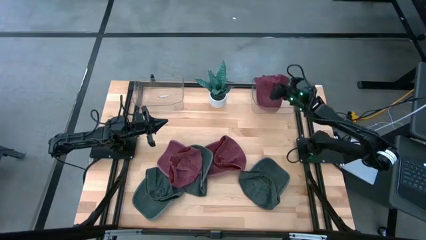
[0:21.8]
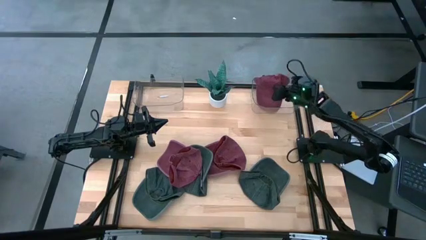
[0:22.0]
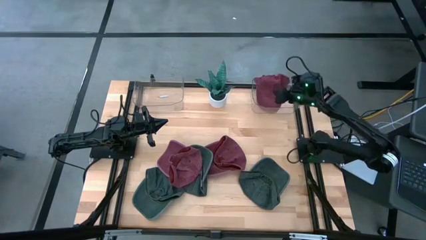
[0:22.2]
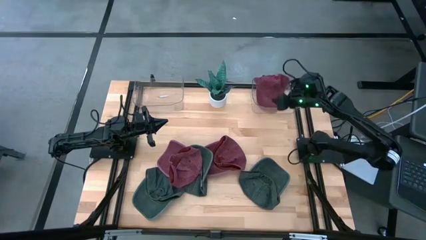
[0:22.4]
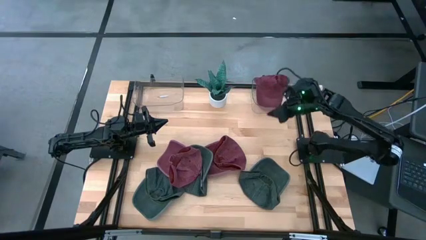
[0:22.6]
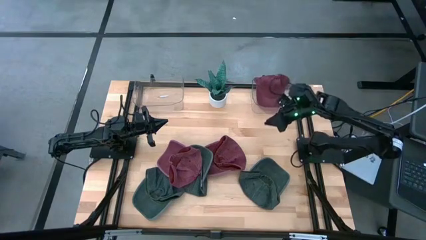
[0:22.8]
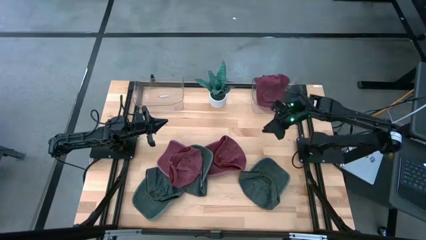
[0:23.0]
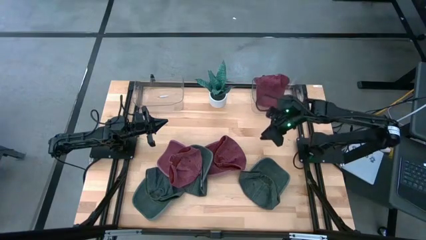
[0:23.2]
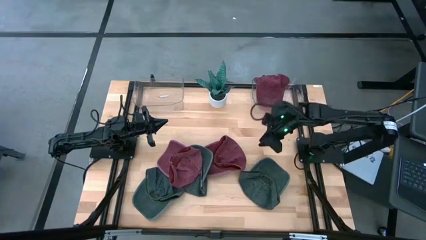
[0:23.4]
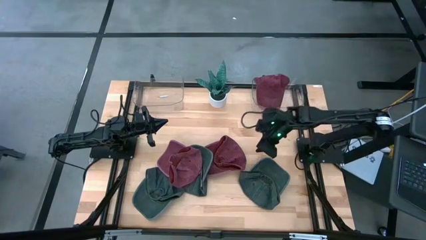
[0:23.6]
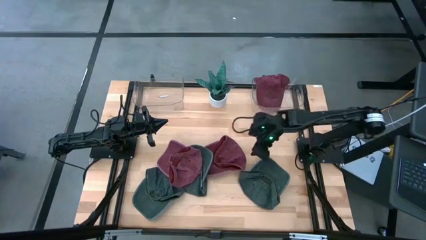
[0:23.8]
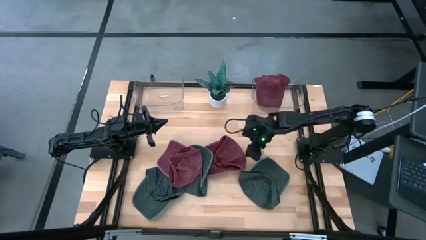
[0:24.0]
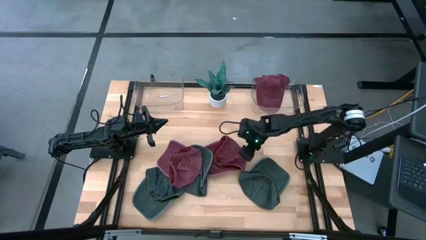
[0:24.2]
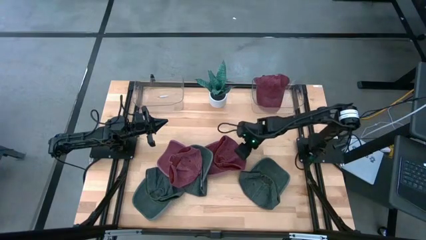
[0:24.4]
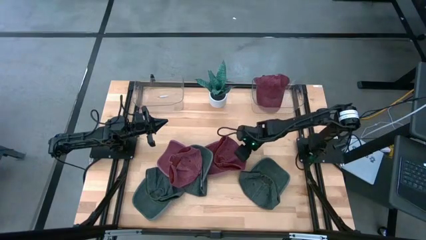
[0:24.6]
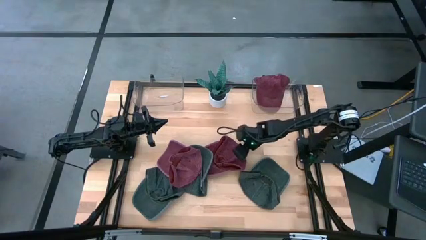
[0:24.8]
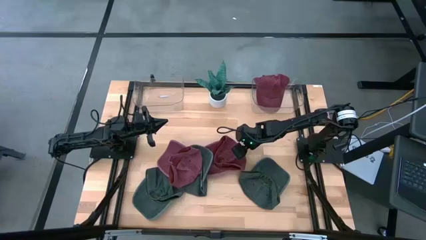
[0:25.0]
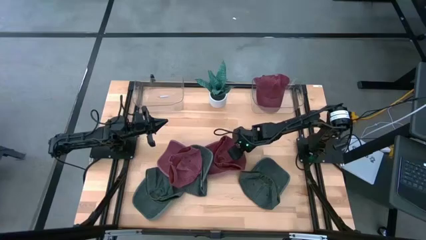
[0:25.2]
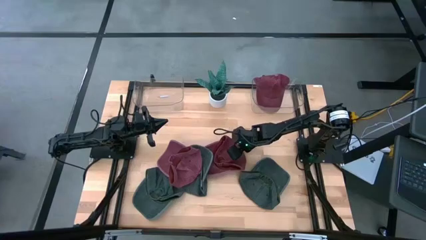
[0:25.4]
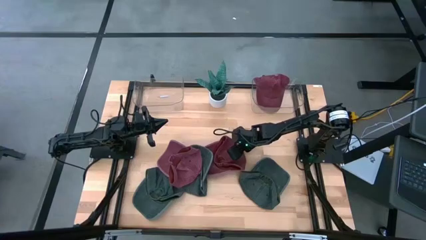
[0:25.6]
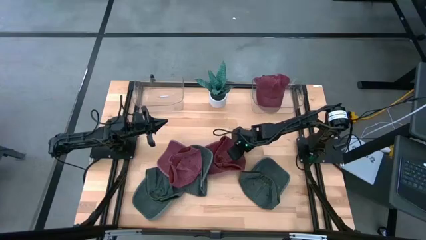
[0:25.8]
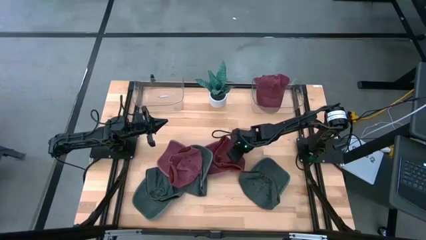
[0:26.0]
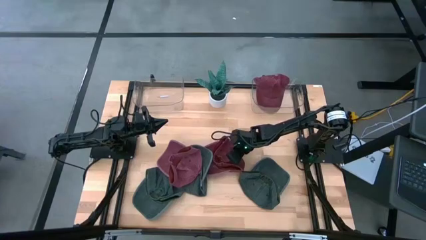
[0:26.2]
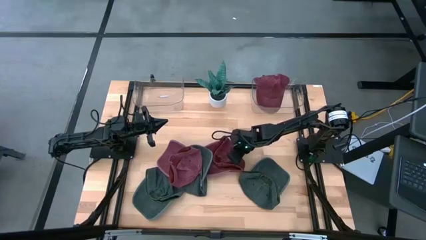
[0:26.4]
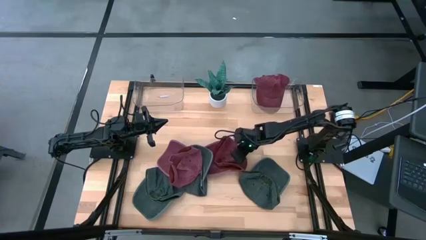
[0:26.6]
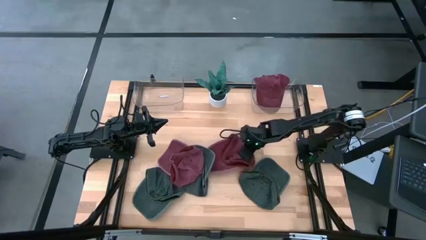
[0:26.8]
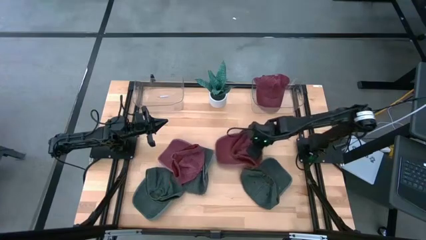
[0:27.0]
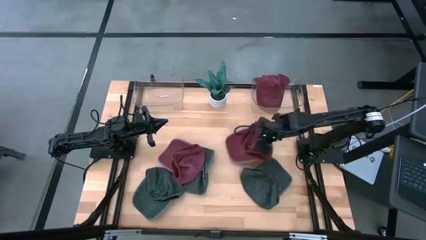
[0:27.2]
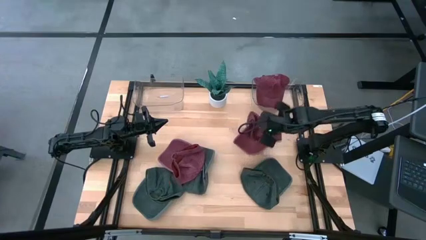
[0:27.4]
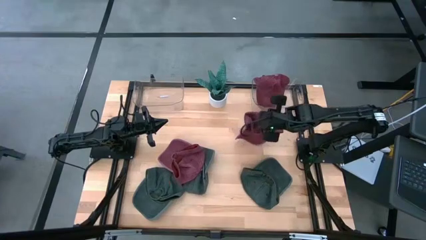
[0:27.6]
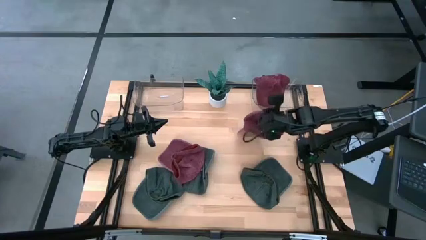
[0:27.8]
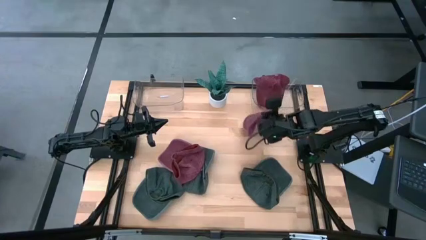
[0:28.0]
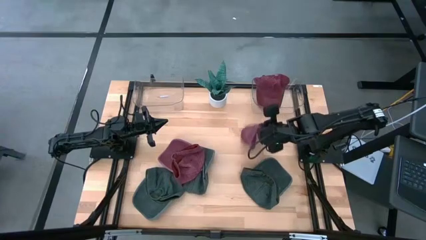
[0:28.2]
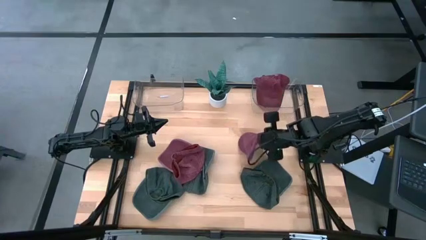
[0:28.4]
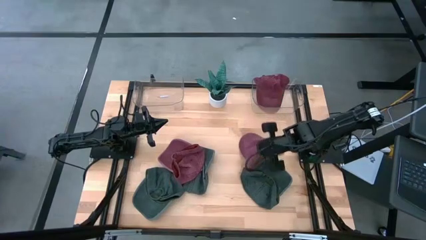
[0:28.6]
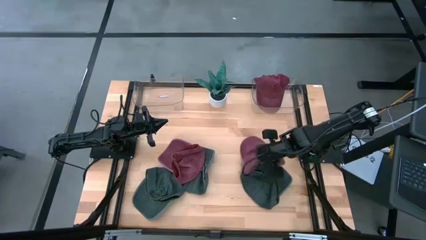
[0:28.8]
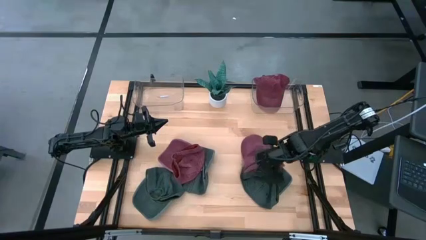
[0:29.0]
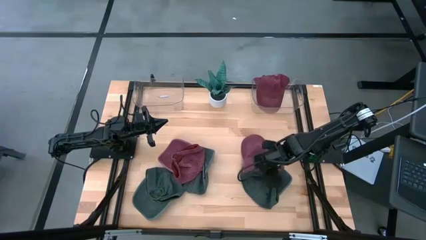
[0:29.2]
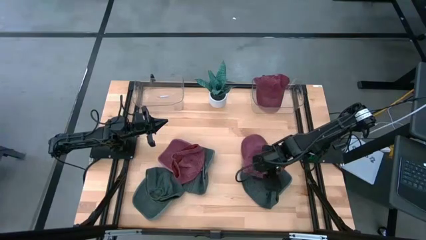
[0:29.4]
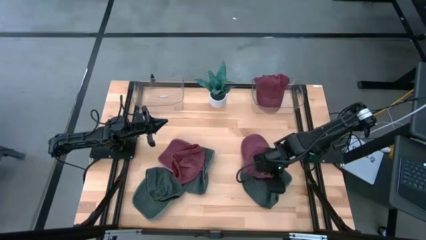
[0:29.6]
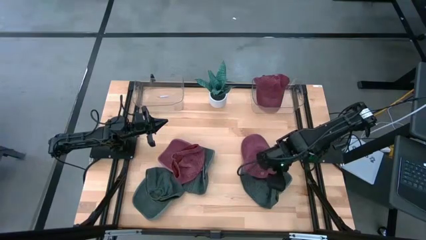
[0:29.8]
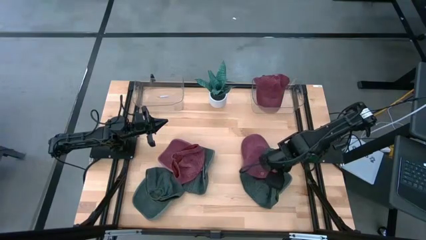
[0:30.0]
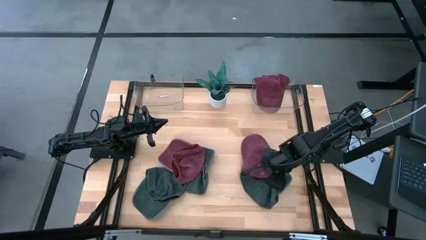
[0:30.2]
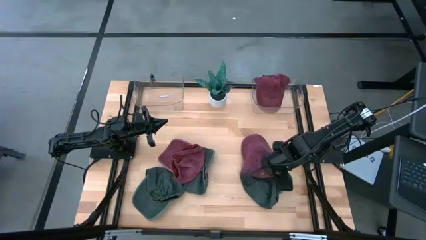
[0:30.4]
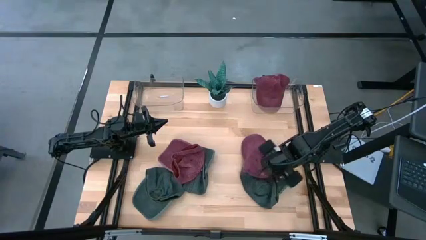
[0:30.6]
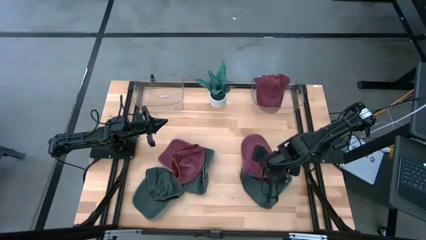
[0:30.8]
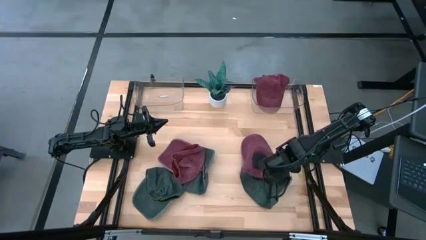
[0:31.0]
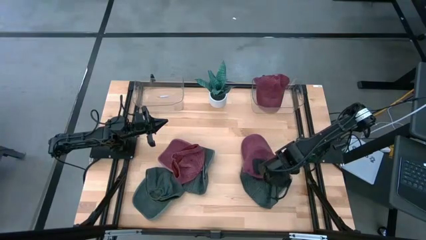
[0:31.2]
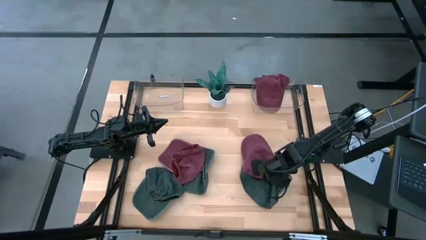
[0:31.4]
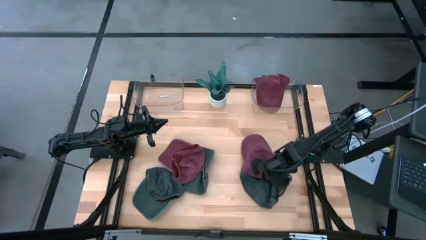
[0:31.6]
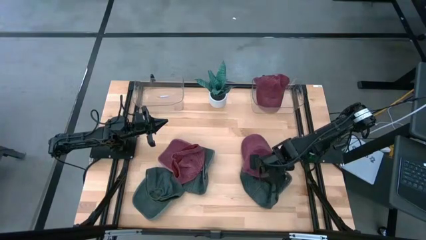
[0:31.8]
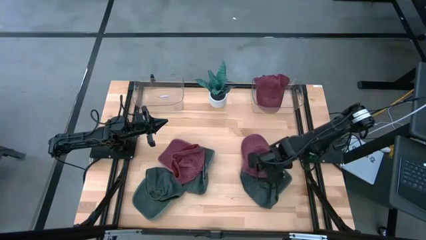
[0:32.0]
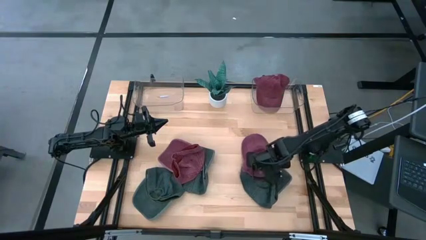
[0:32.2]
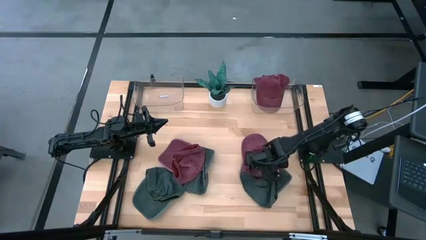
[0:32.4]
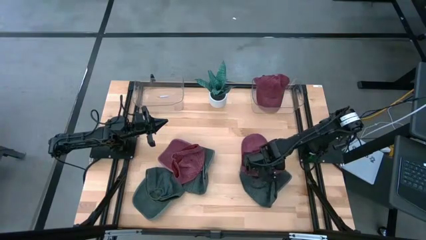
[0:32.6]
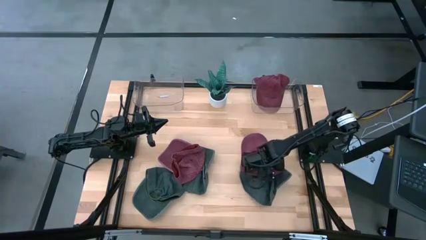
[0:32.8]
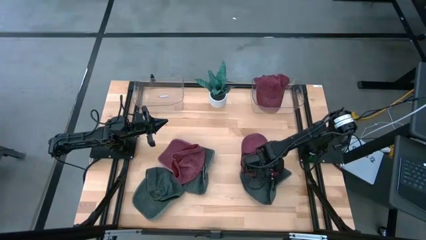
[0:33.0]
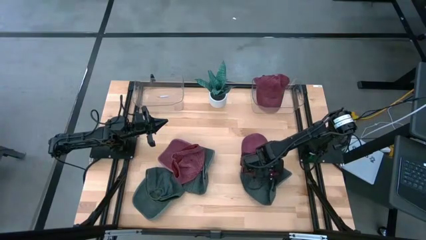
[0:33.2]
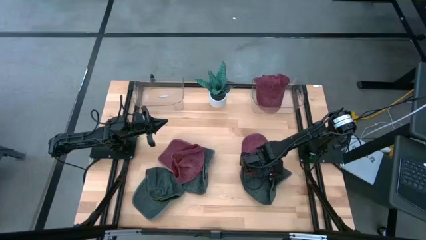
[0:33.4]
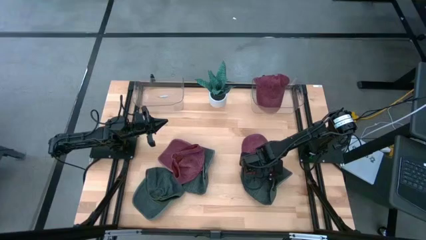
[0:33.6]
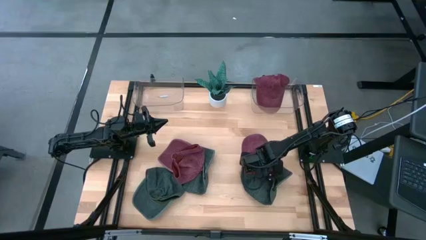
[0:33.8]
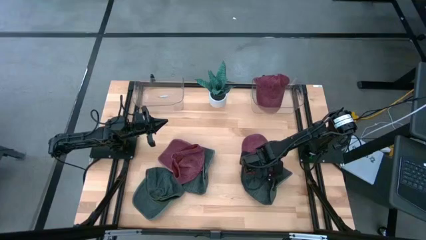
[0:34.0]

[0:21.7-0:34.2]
Task: Pick & Place hat
Put the right red cap into the right transparent bin
